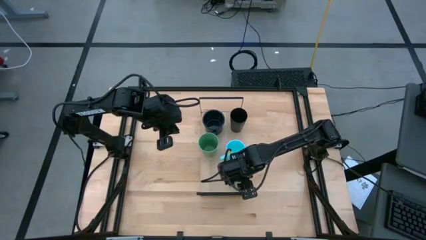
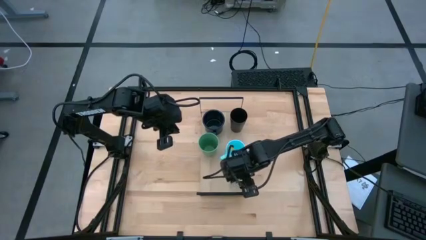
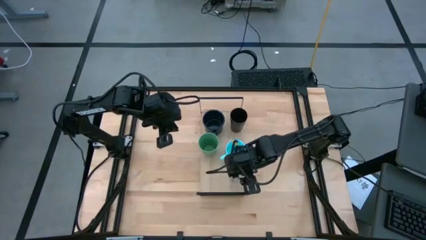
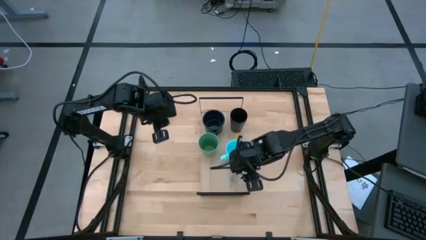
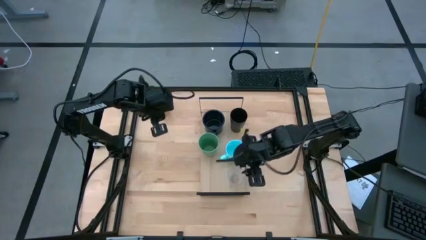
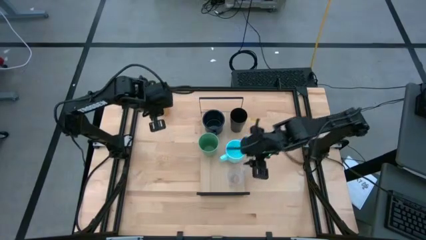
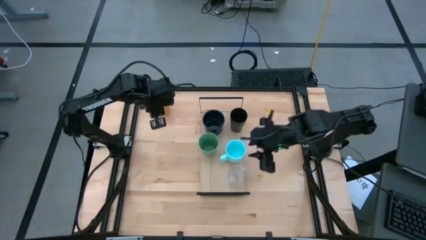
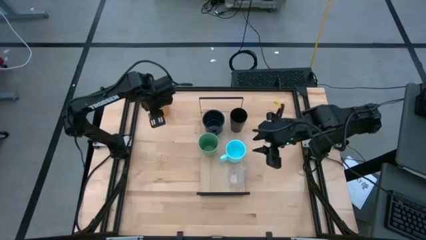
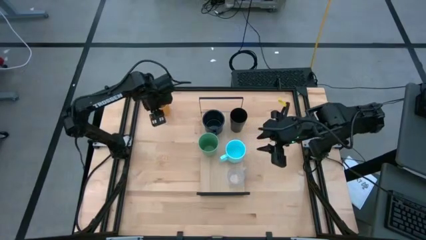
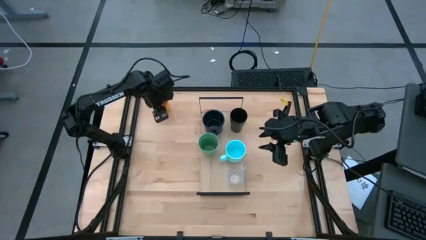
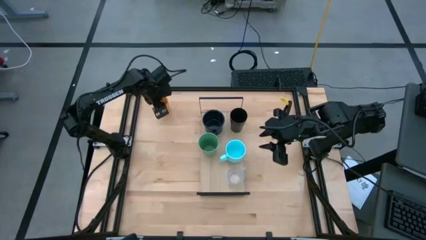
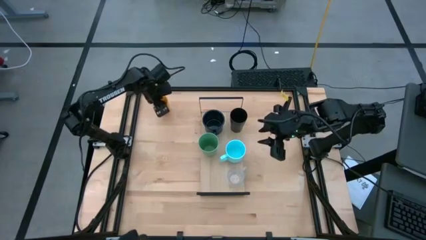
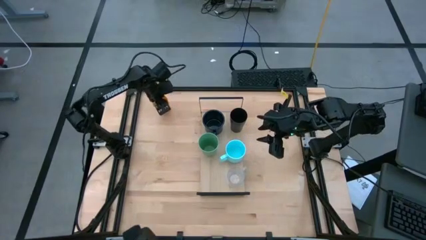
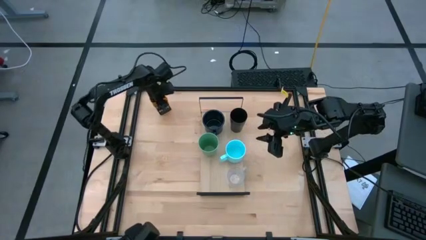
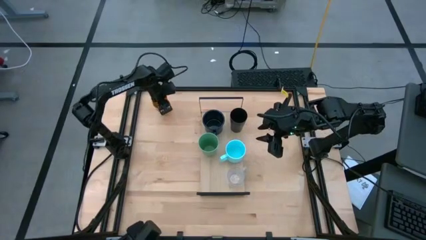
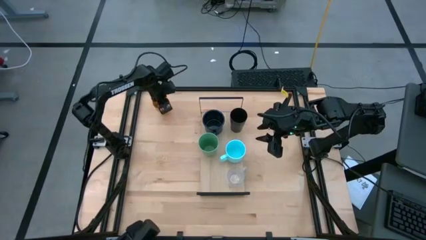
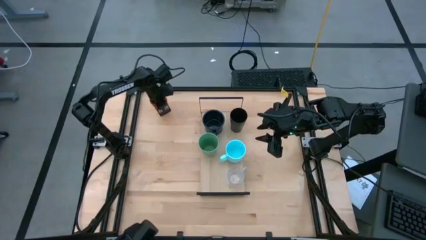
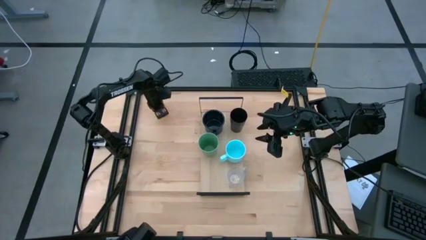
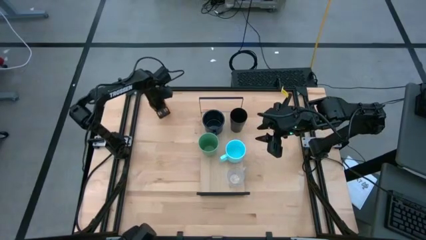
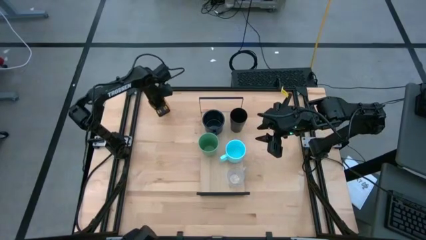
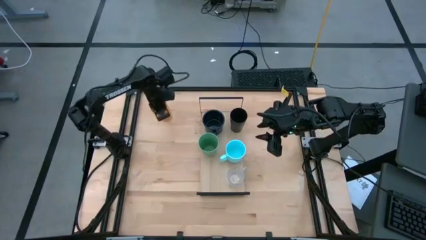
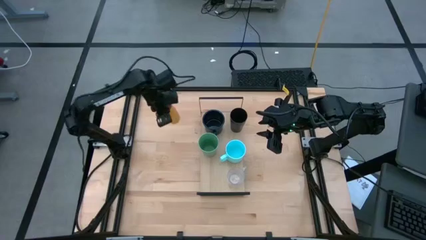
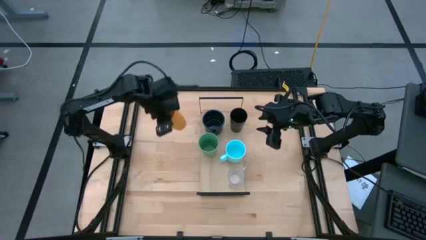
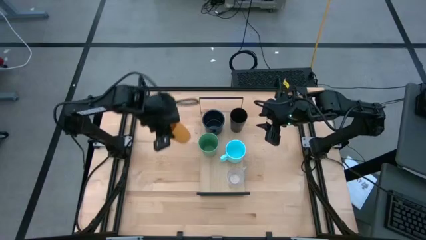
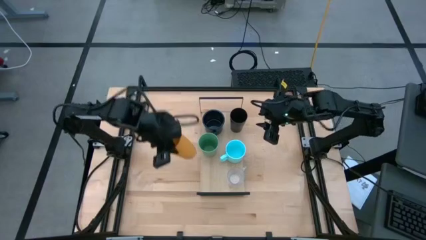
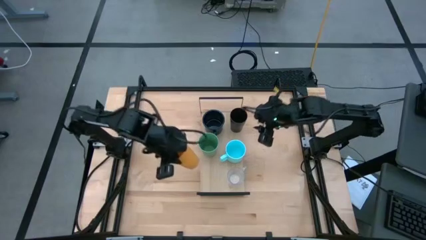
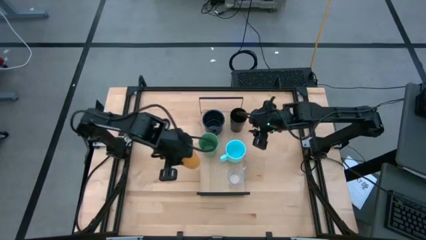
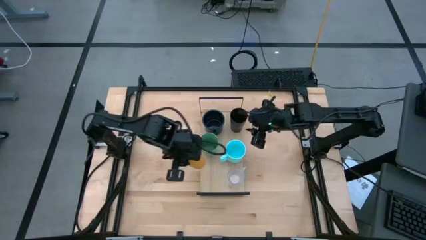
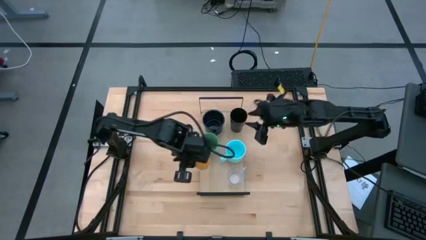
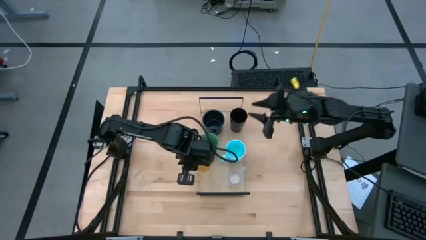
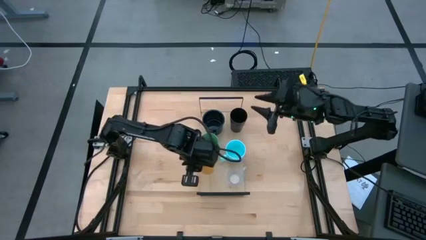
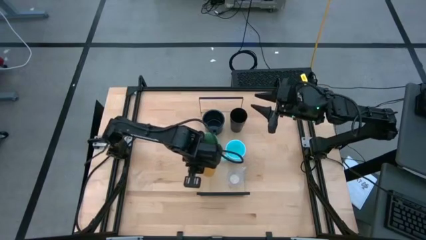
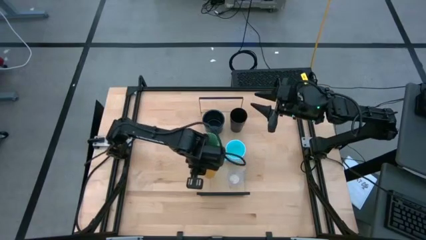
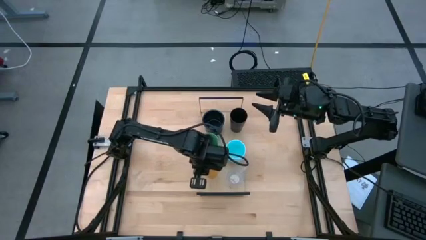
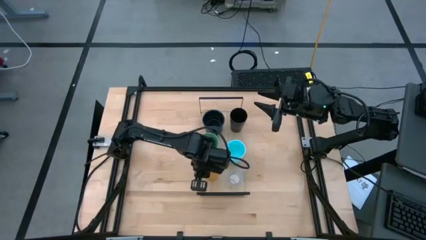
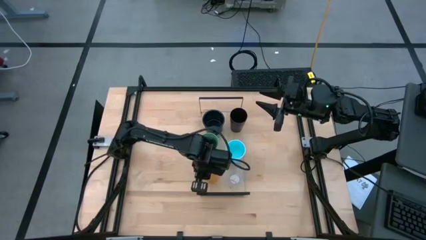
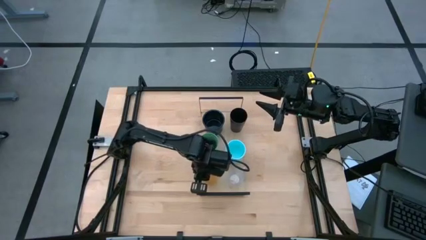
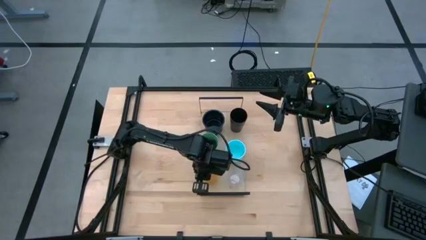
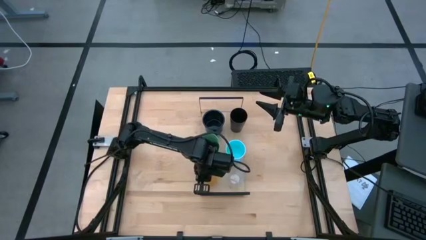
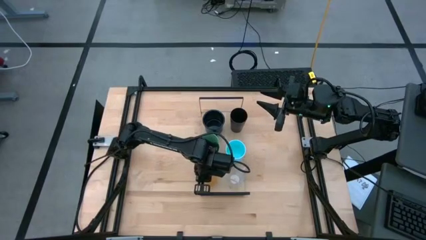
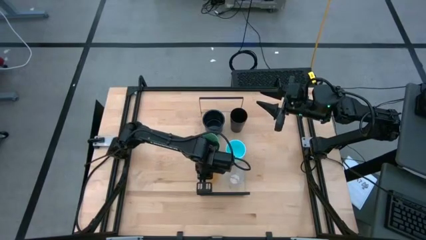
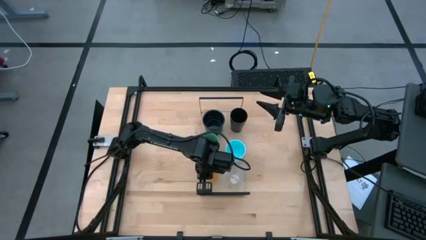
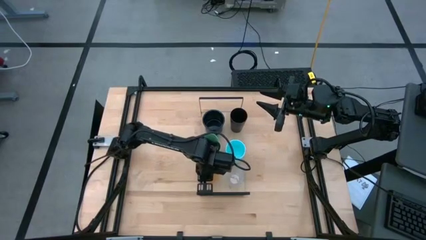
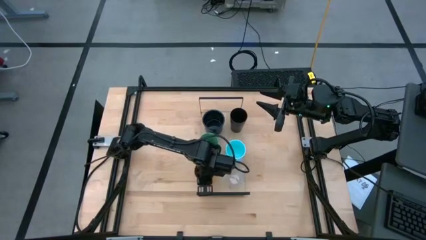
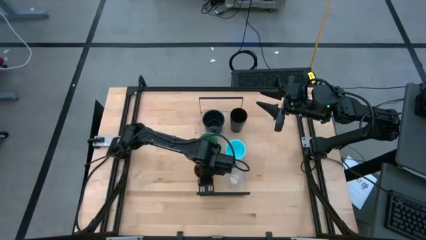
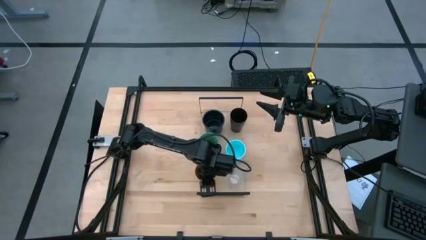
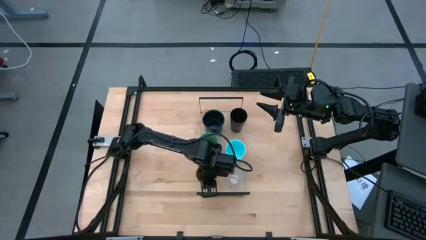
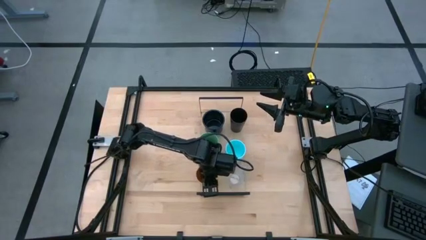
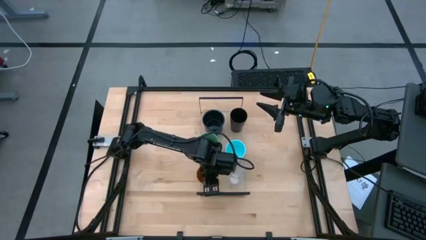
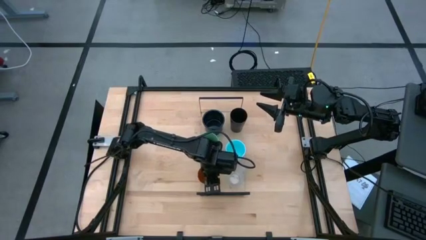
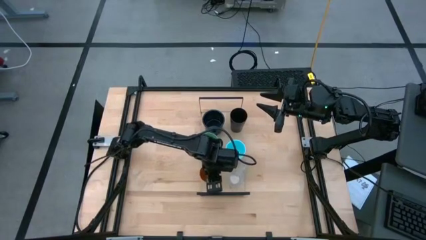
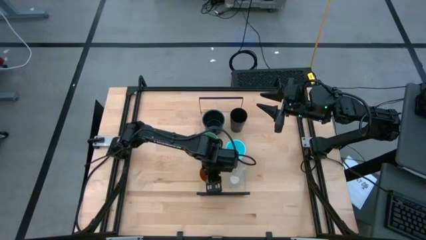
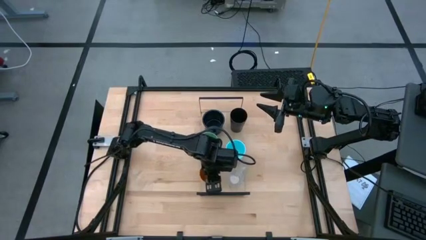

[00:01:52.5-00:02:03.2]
Task: Stack small to large cups/mugs on shelf
Put the yellow cup on the shelf

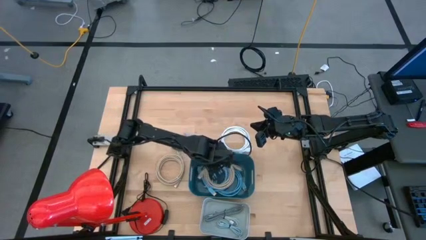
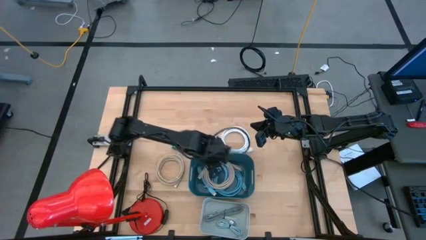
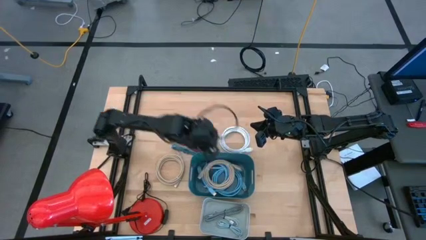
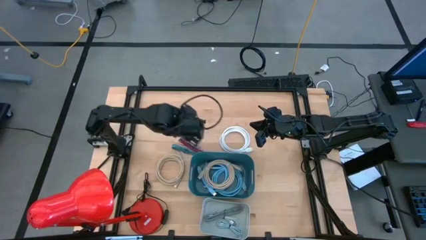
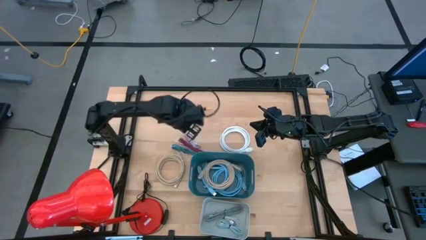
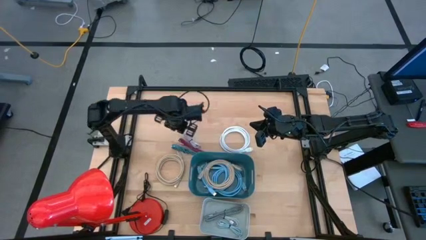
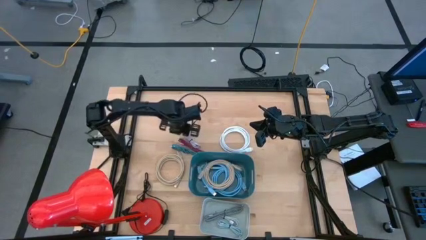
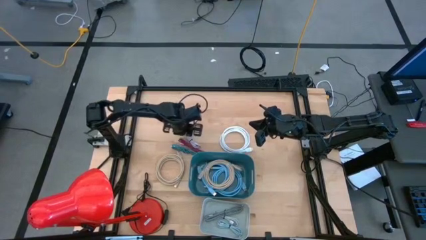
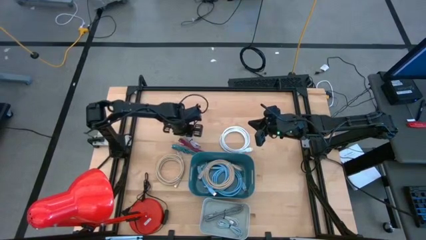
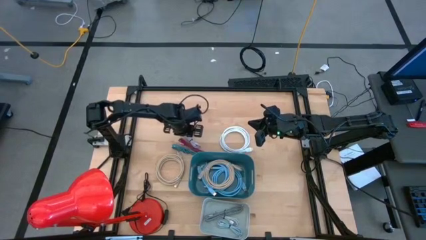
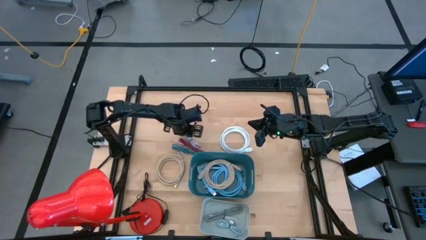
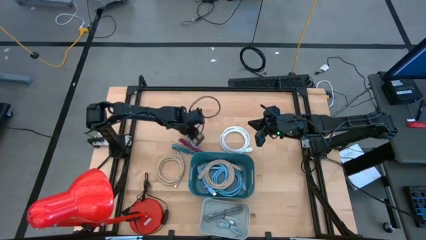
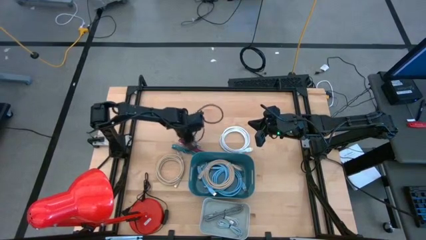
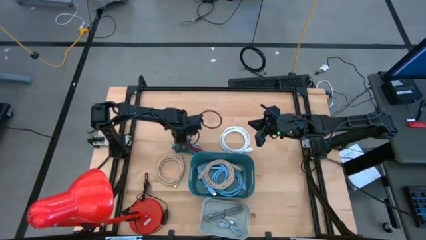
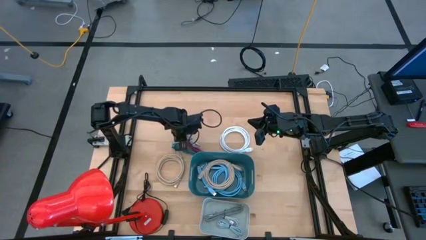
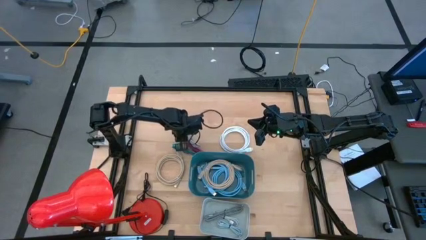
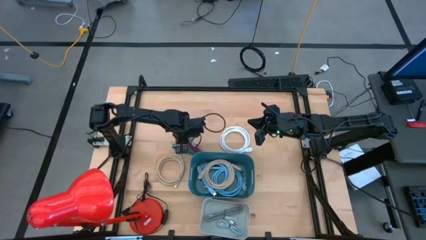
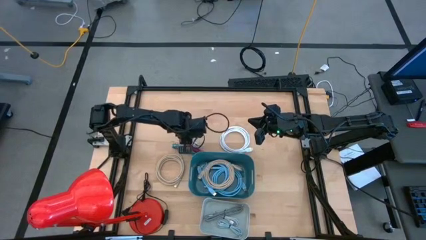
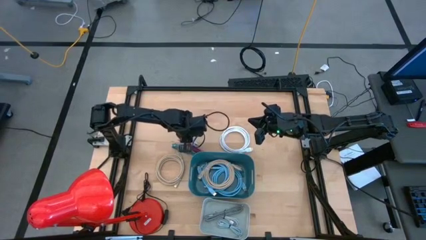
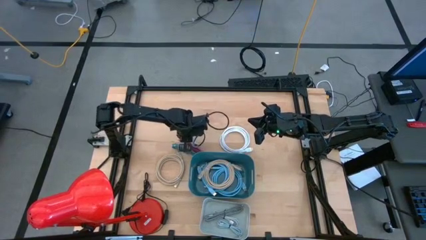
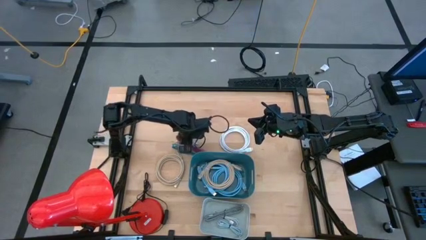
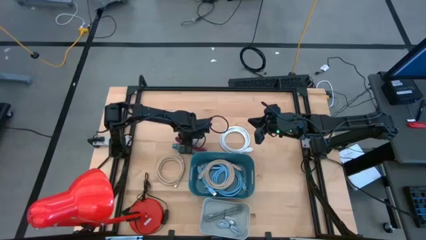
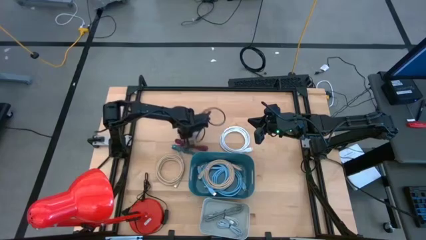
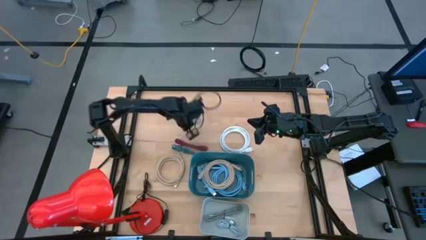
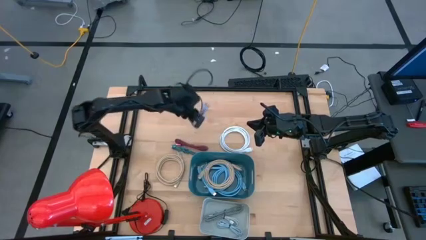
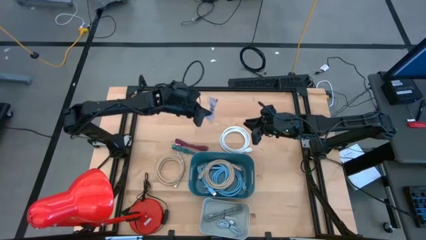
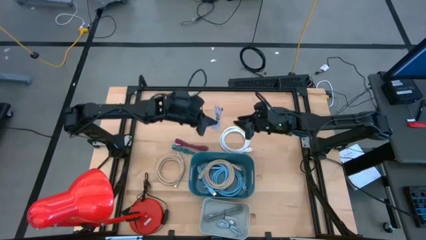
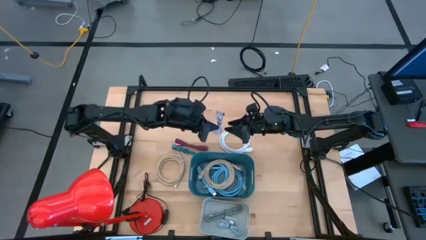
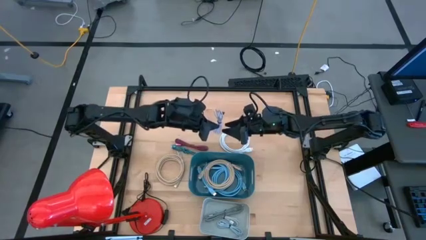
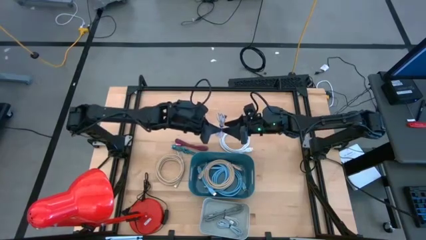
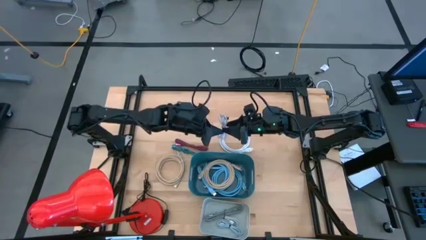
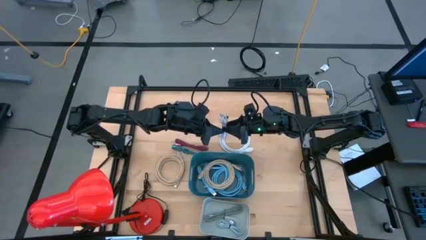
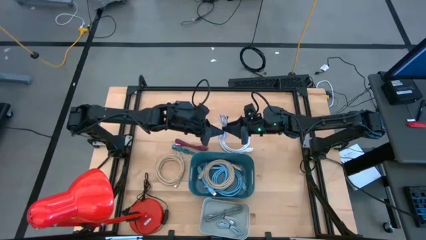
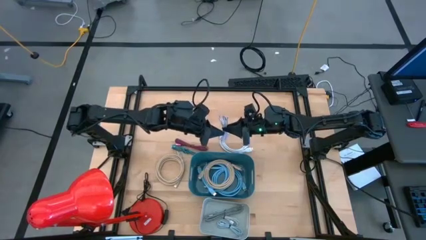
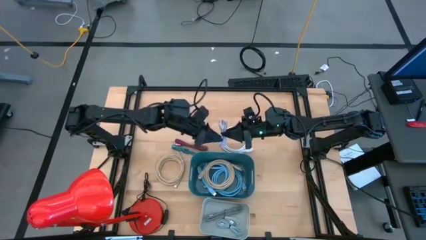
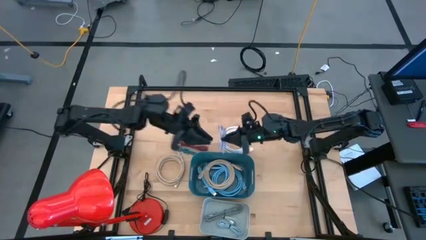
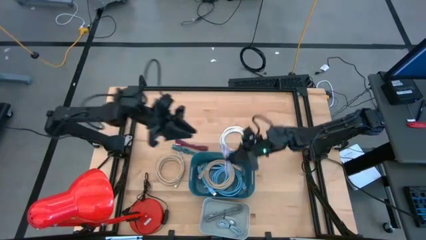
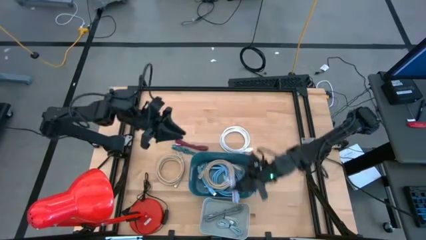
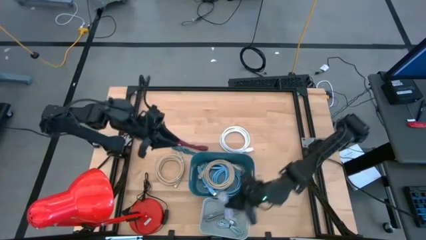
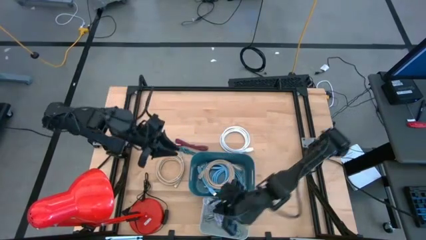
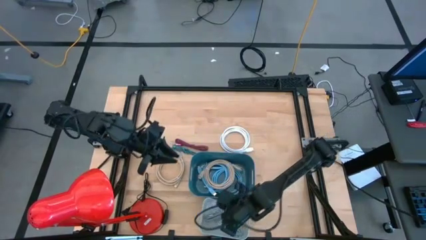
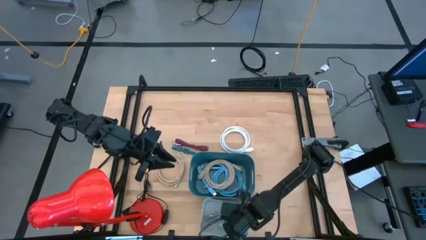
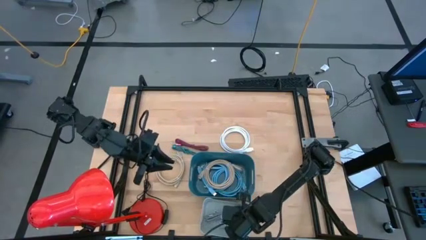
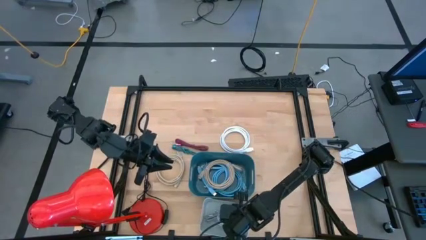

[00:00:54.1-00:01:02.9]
Task: Pick & Place USB Port
Put the white USB cable into the gray bin
